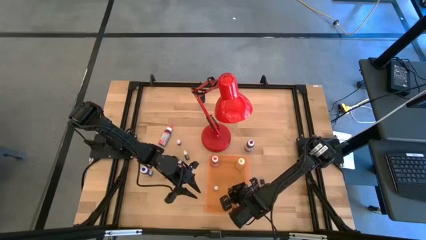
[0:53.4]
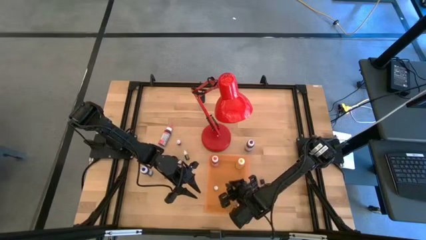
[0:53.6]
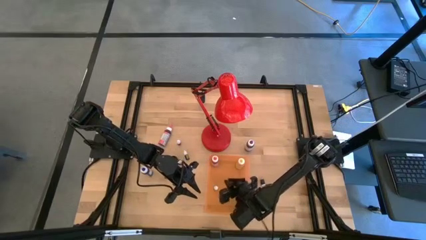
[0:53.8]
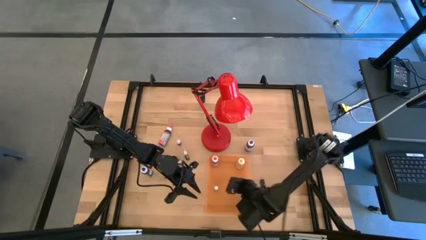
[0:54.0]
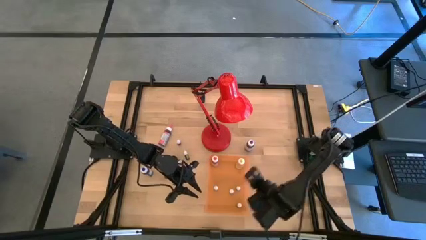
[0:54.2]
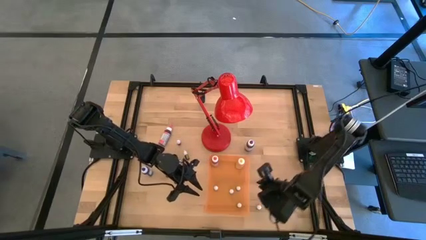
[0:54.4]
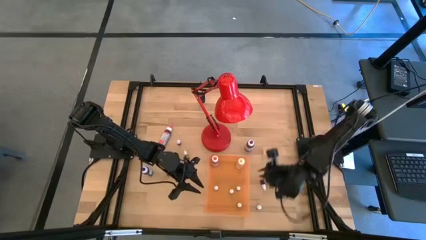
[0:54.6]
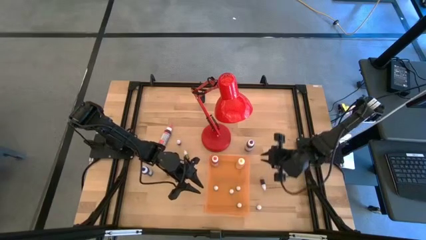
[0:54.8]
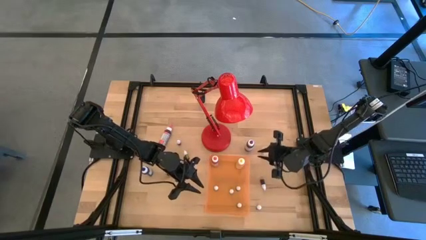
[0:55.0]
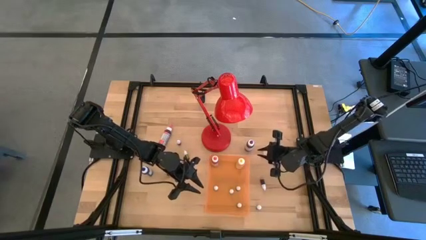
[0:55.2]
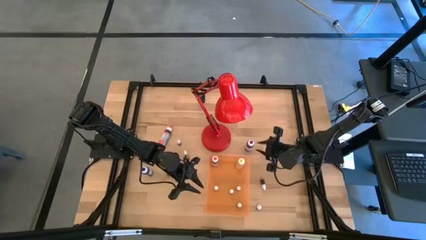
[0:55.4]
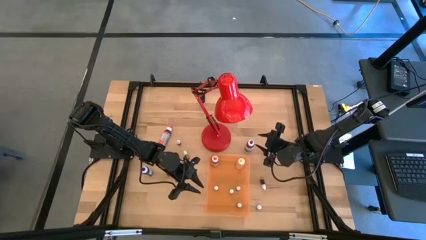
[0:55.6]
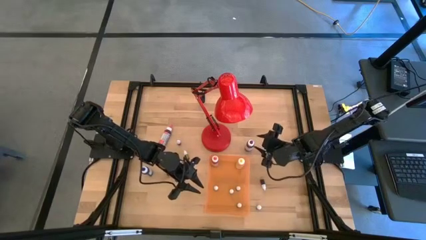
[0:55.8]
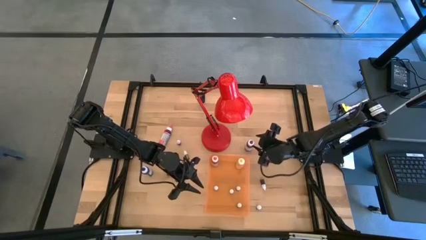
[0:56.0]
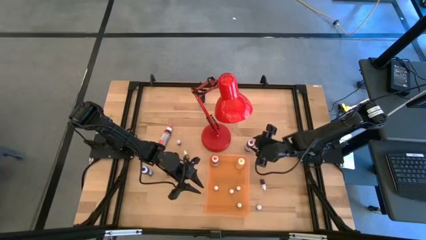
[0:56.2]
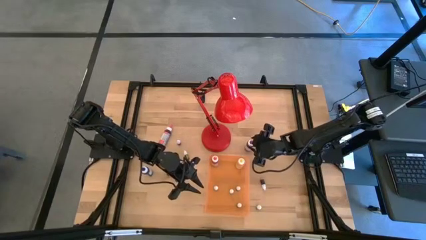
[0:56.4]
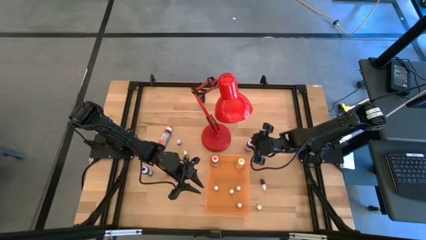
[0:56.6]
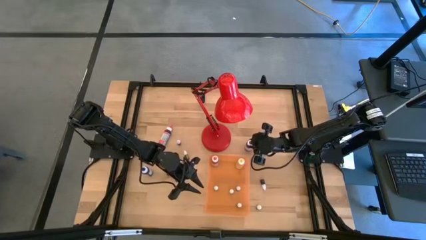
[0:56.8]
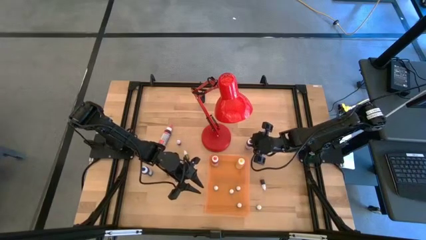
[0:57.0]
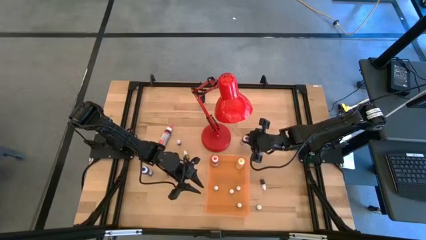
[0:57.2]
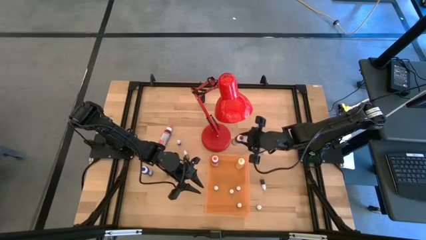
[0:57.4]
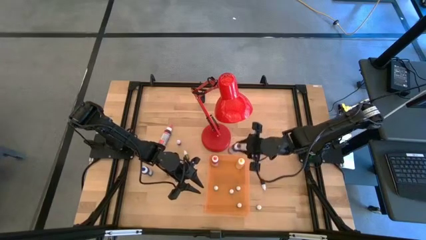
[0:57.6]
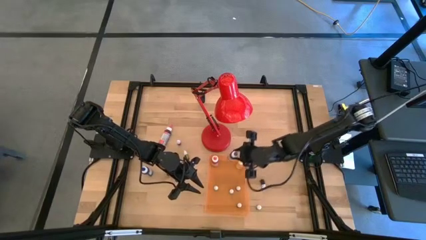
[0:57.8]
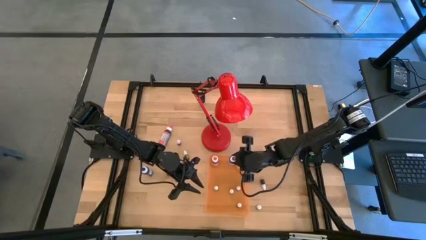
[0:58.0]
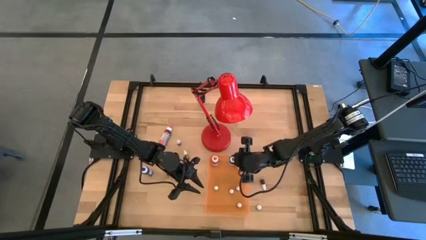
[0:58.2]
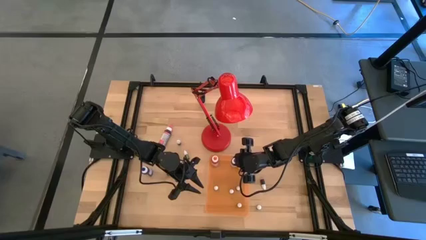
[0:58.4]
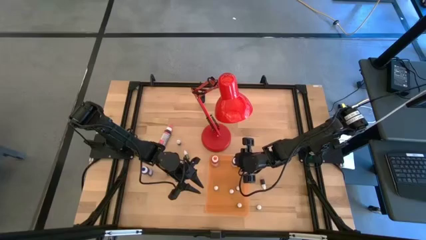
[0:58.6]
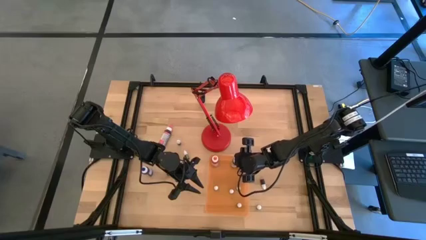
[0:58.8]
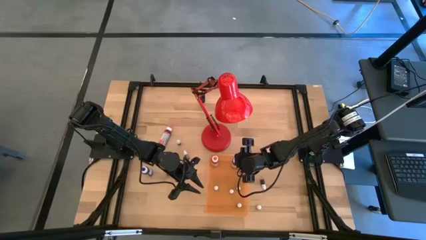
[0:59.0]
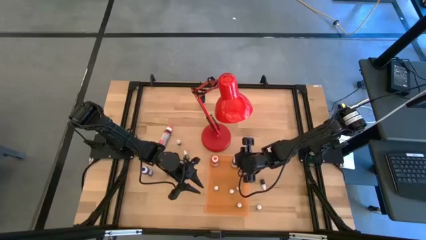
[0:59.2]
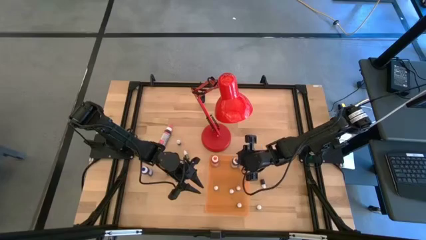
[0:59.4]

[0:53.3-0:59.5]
Task: Pick & Place food coloring
Put the large violet food coloring bottle into the orange bin

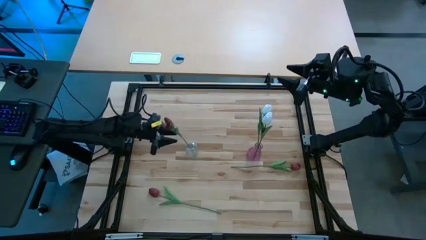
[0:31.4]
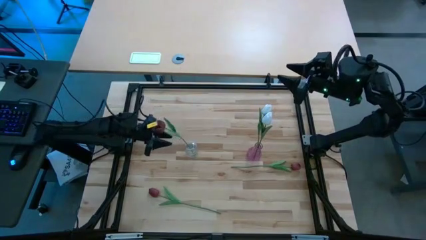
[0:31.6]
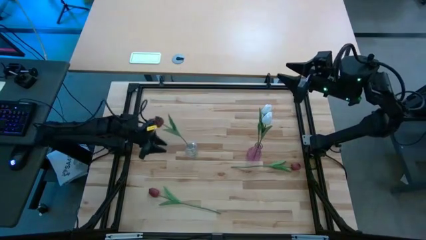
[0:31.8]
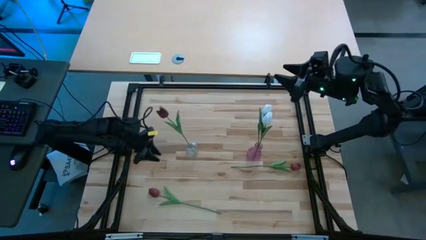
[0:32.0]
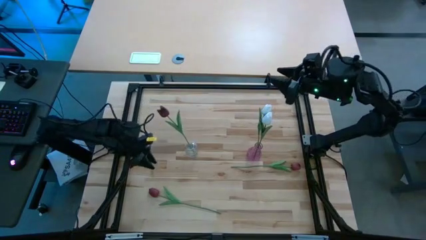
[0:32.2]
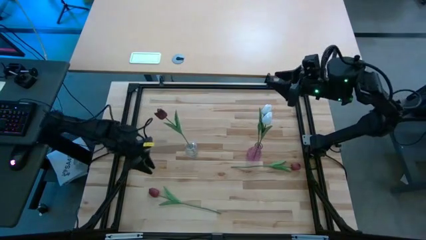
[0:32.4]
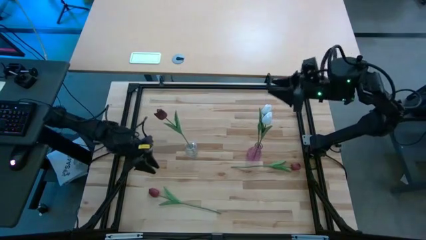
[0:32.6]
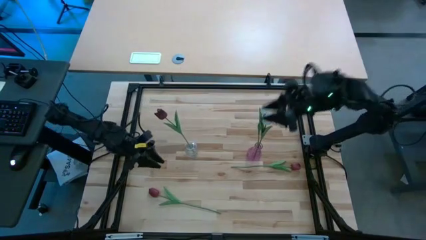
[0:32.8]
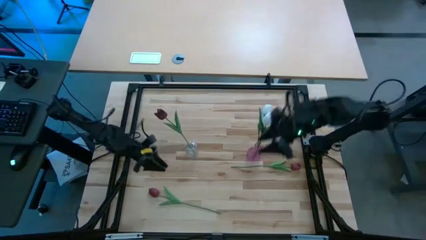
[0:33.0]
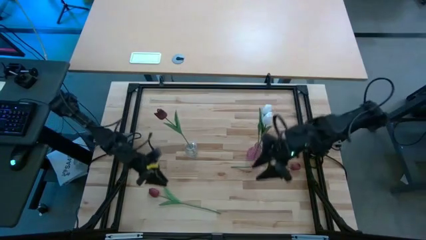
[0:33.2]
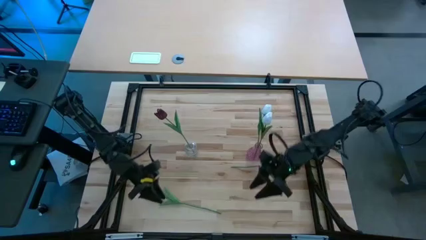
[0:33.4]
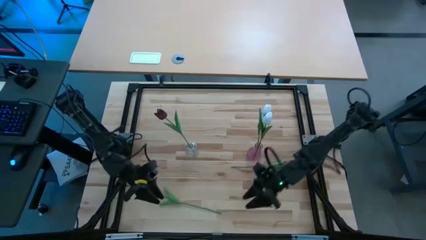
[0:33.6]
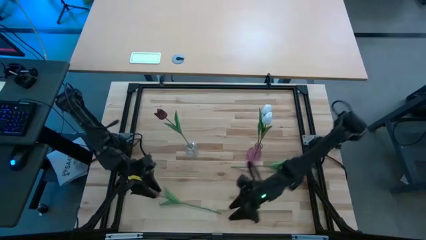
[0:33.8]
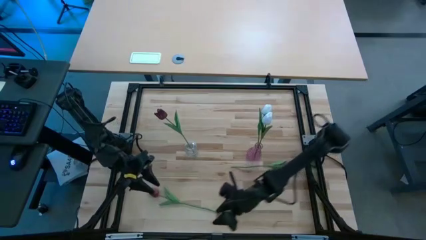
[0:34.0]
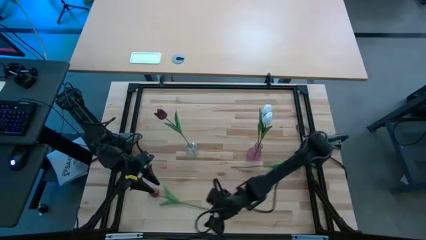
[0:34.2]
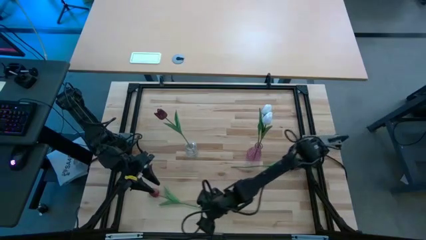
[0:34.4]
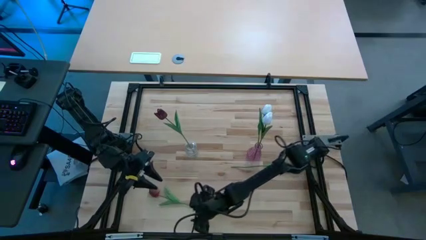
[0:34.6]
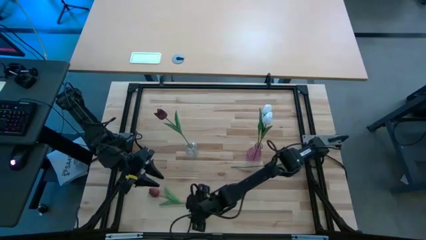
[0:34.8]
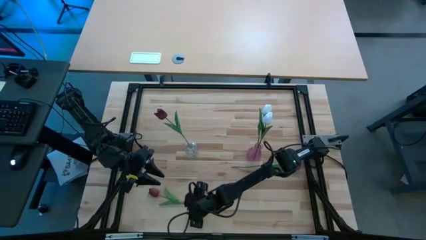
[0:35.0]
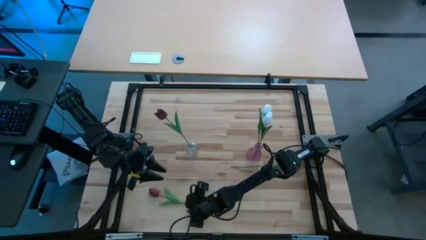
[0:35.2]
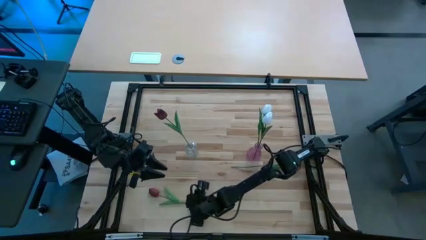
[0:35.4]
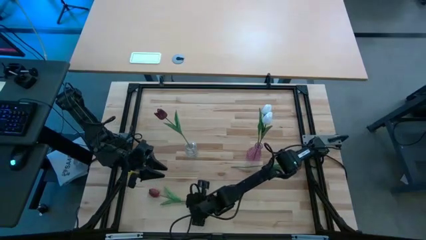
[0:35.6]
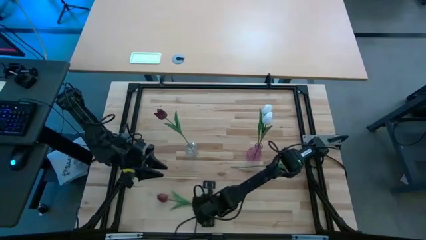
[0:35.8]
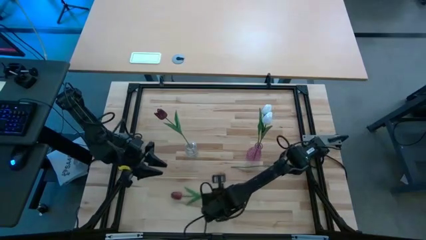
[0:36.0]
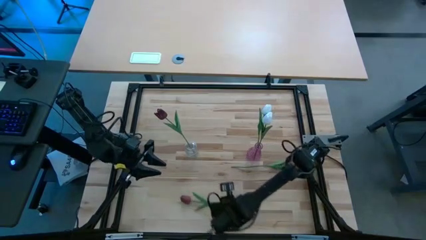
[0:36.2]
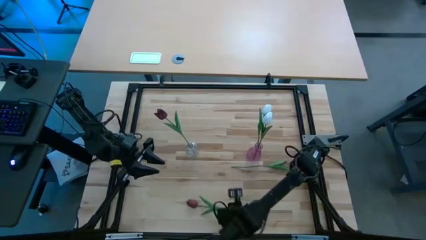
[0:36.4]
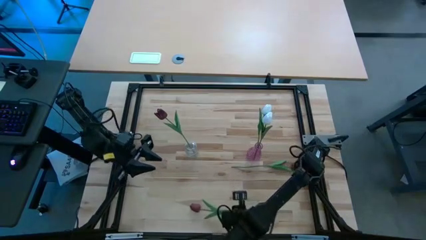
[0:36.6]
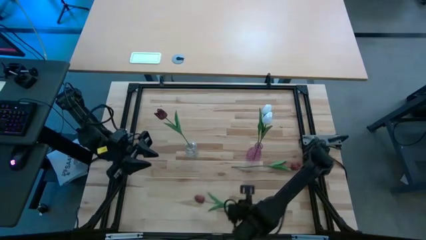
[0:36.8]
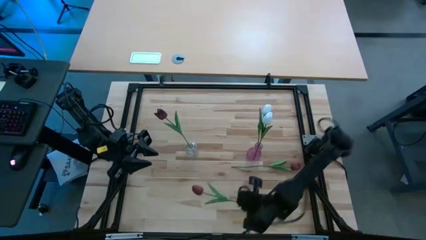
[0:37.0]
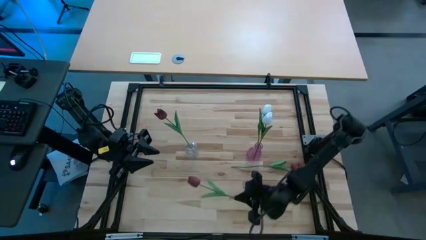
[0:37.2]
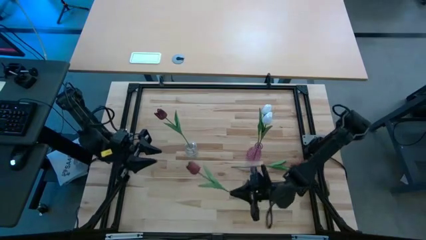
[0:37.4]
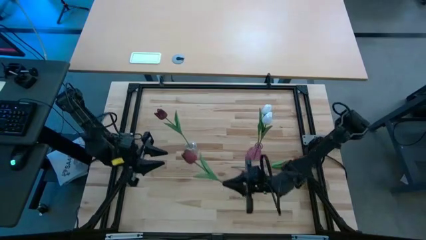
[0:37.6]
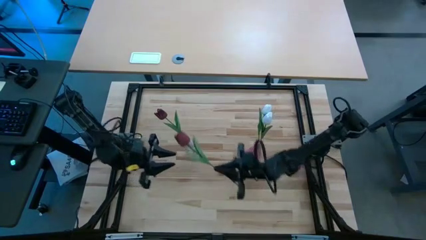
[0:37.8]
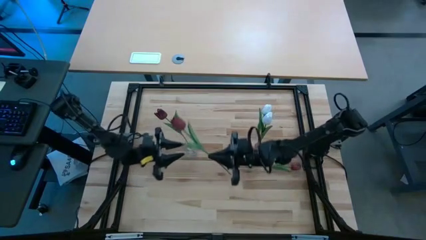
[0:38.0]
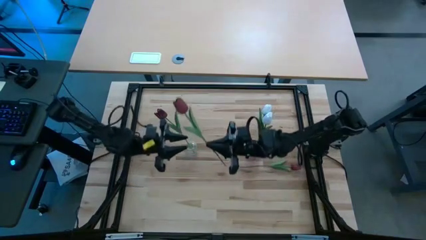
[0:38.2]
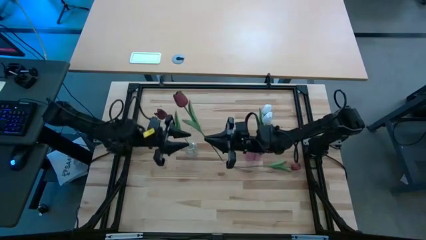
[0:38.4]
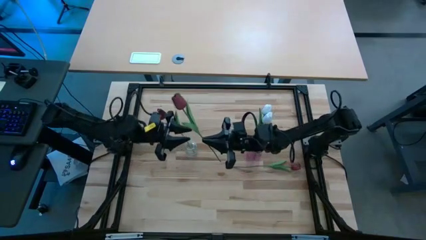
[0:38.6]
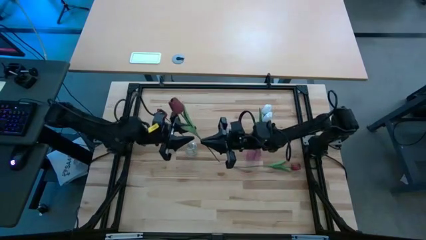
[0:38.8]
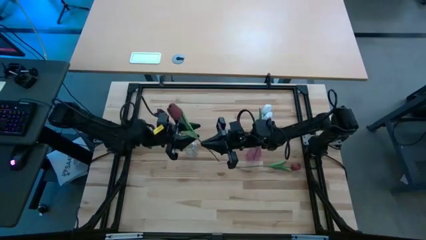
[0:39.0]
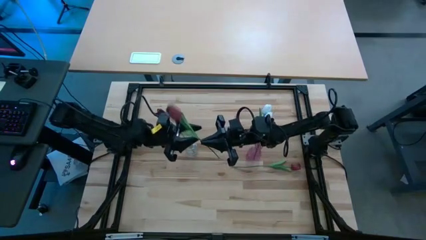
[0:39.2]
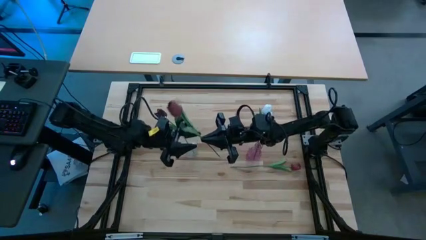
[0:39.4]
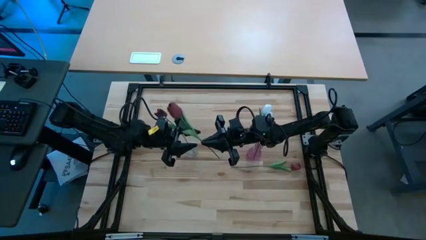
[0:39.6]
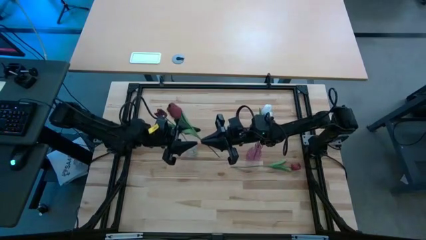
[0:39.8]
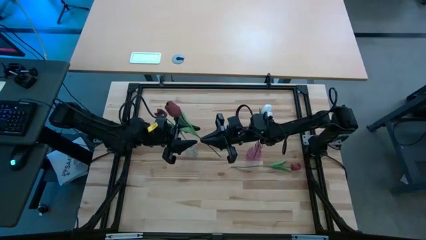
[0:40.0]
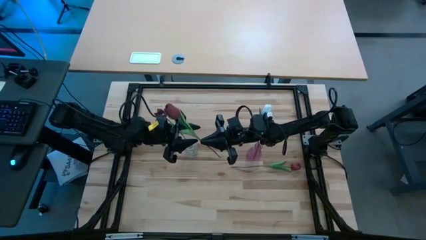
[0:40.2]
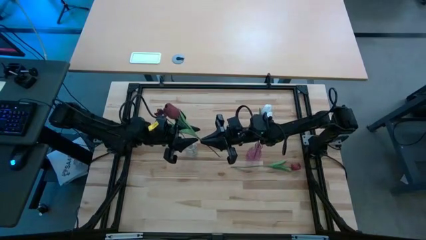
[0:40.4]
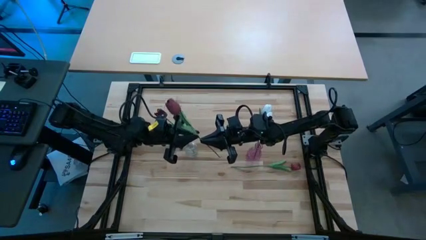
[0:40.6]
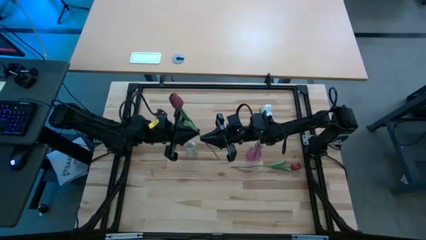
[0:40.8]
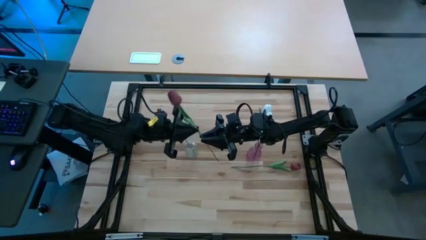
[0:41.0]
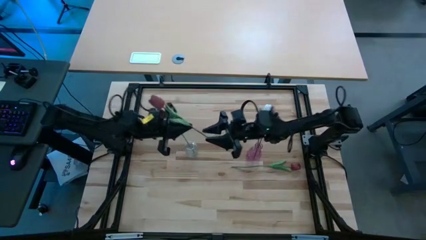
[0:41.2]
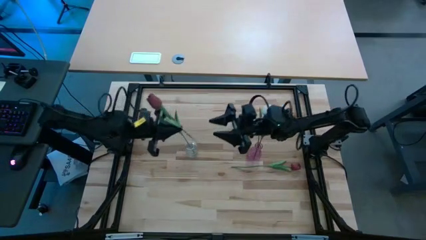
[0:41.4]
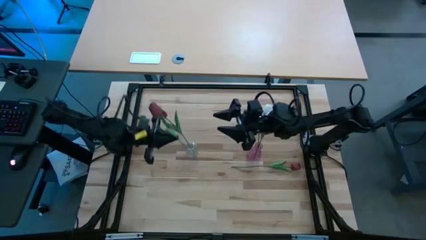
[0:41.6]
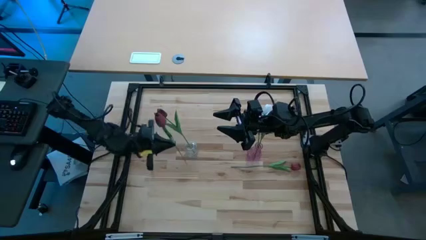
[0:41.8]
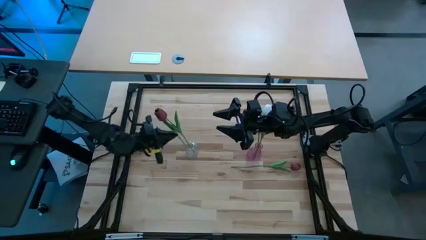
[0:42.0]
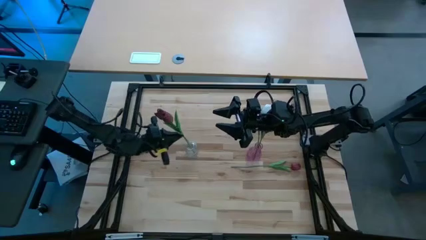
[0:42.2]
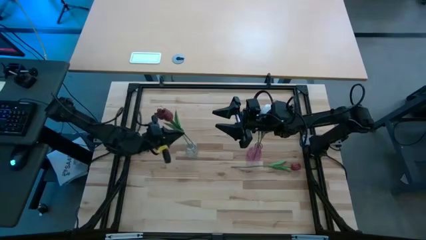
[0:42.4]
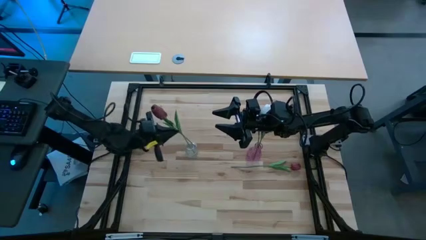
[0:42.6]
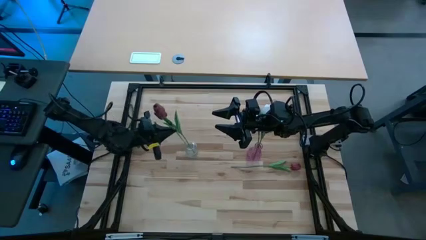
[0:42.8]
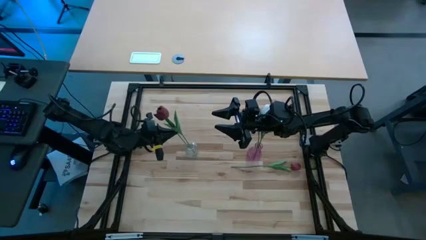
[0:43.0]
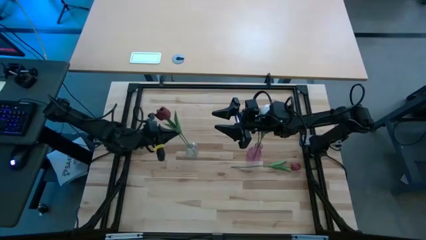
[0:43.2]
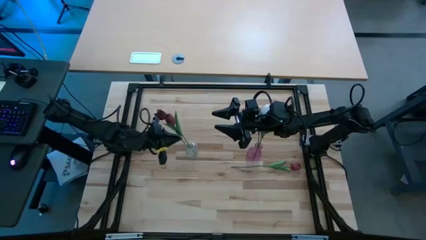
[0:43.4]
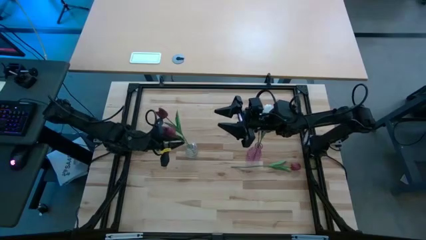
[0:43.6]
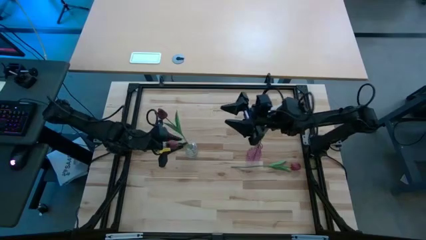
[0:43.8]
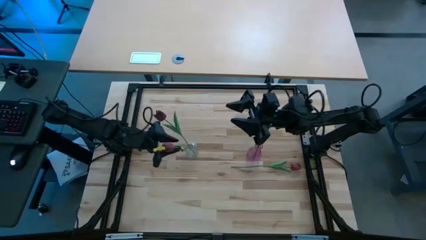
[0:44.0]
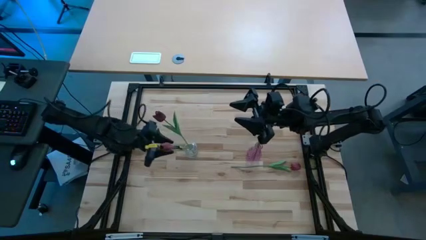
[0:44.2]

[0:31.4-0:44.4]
Task: Sort flowers into vase by color
Put the bottom red flower into the transparent vase
